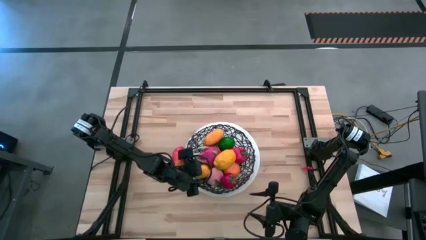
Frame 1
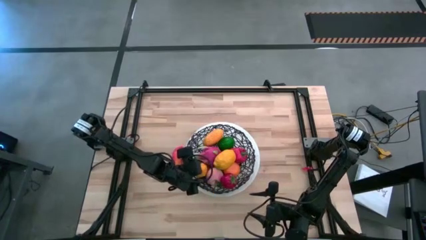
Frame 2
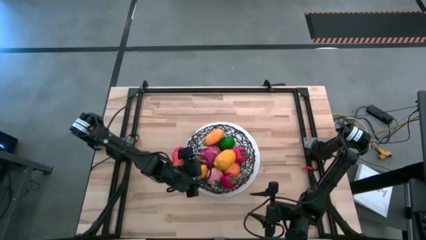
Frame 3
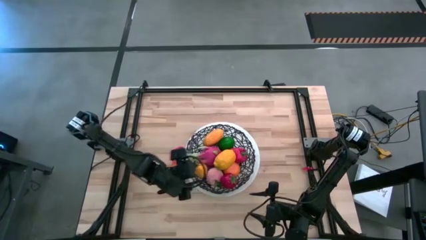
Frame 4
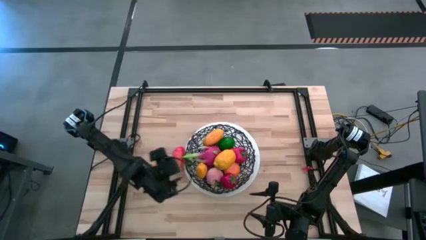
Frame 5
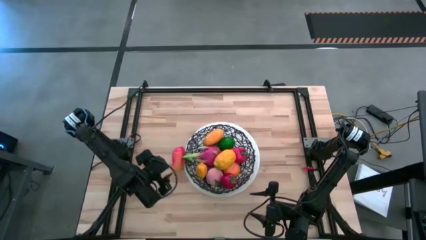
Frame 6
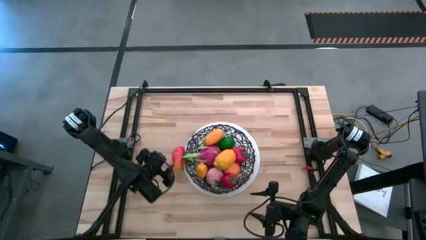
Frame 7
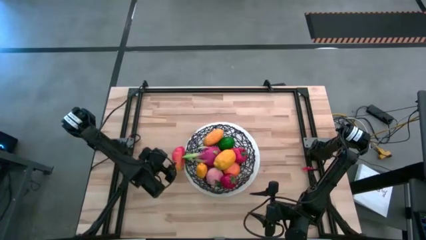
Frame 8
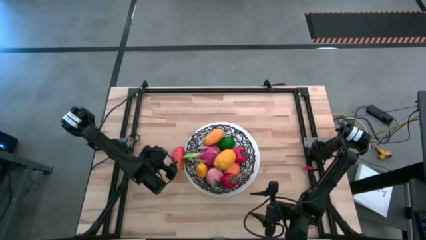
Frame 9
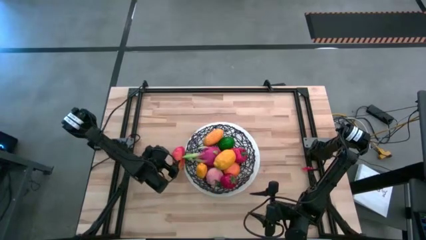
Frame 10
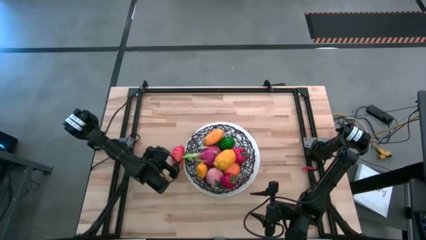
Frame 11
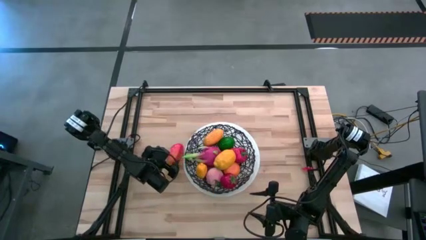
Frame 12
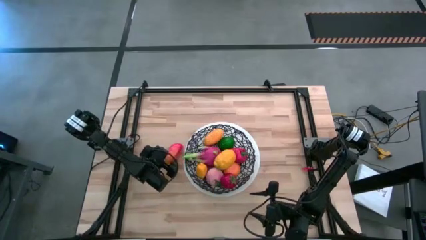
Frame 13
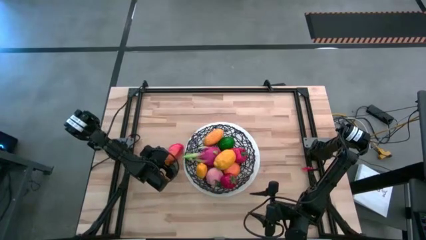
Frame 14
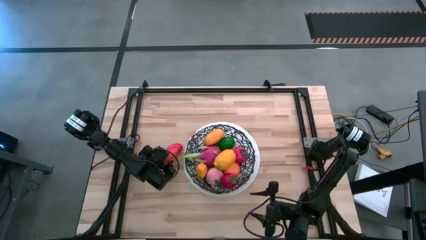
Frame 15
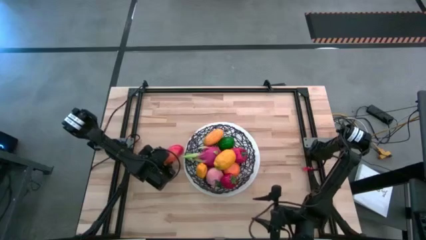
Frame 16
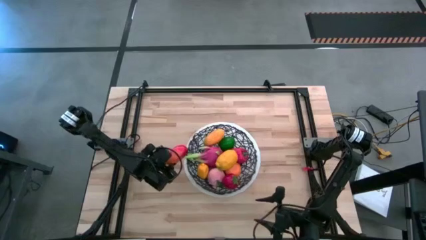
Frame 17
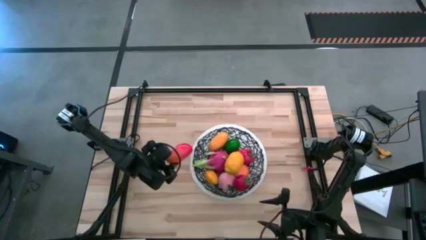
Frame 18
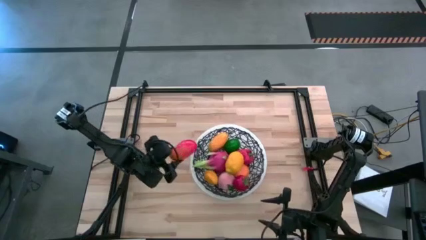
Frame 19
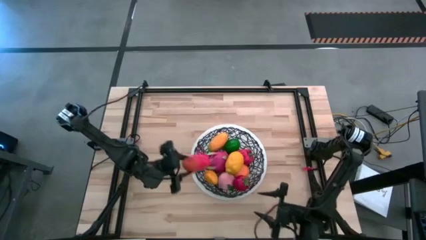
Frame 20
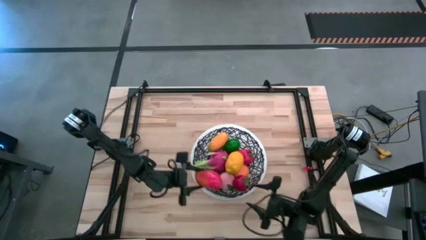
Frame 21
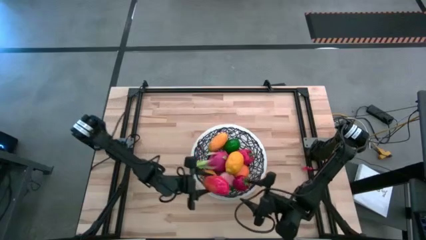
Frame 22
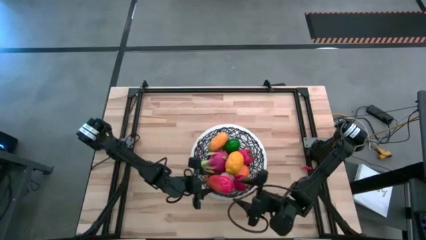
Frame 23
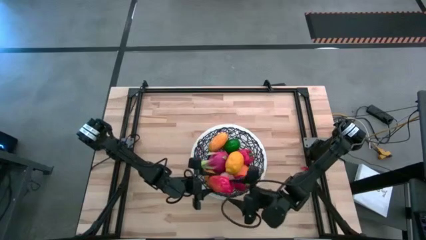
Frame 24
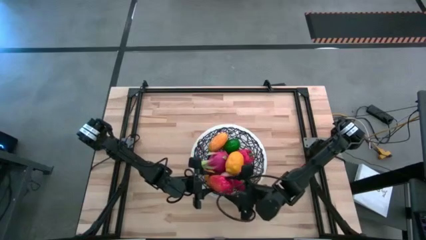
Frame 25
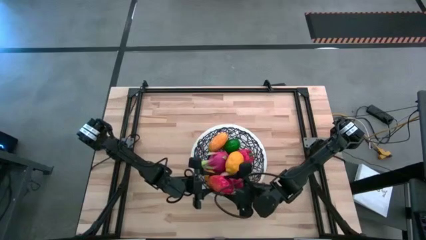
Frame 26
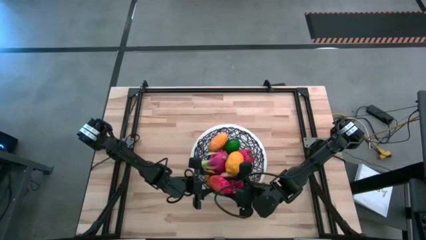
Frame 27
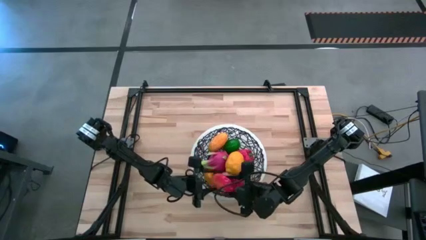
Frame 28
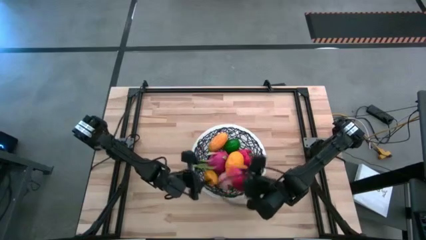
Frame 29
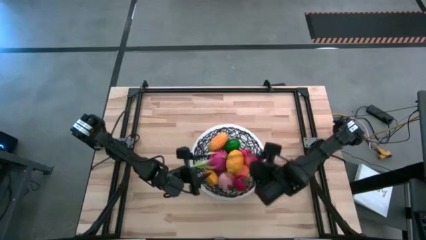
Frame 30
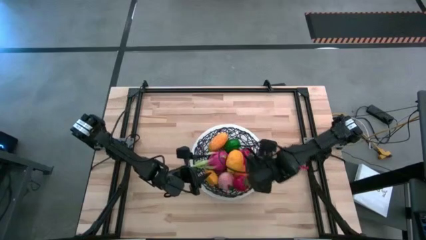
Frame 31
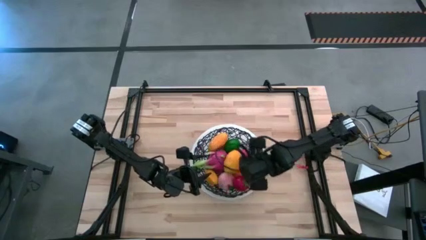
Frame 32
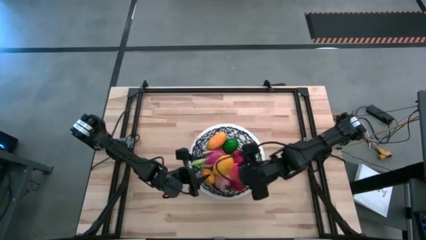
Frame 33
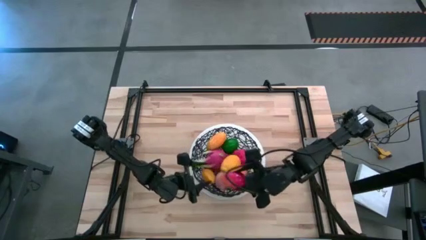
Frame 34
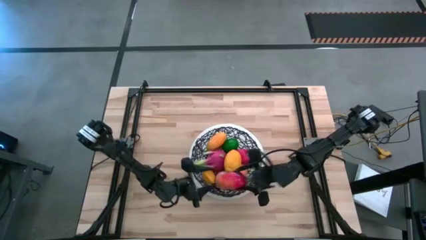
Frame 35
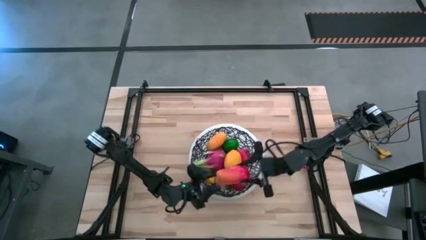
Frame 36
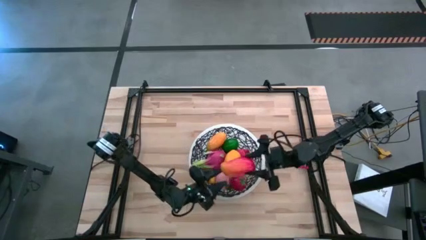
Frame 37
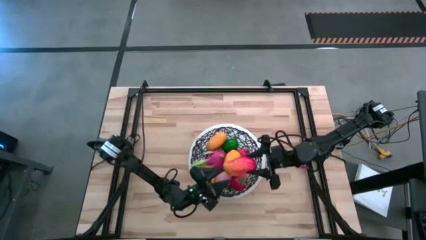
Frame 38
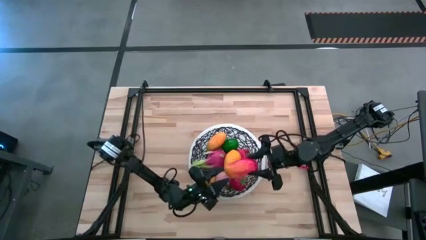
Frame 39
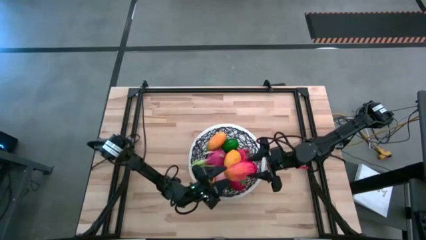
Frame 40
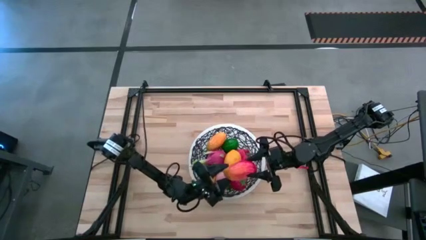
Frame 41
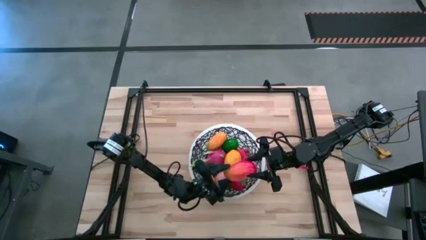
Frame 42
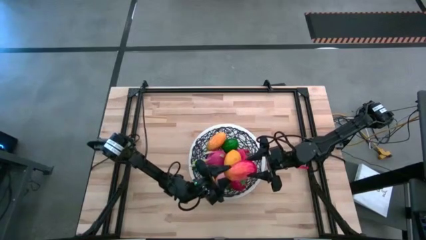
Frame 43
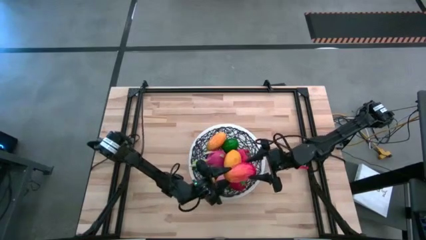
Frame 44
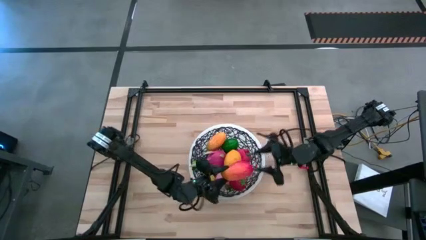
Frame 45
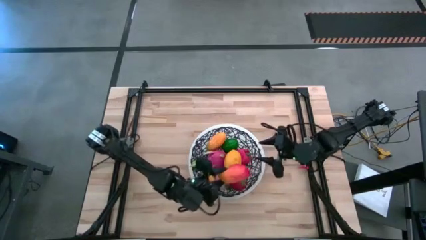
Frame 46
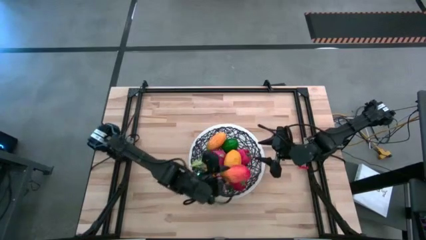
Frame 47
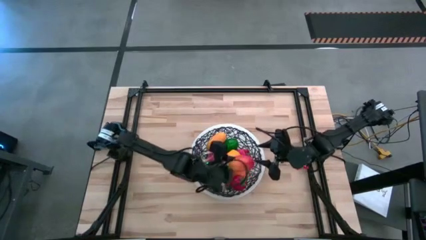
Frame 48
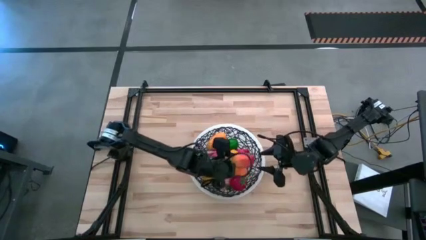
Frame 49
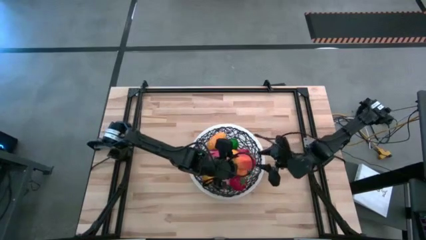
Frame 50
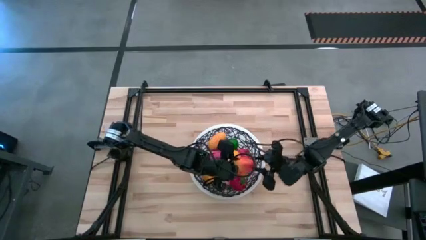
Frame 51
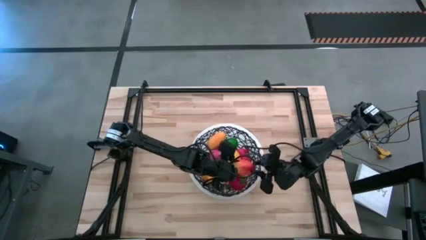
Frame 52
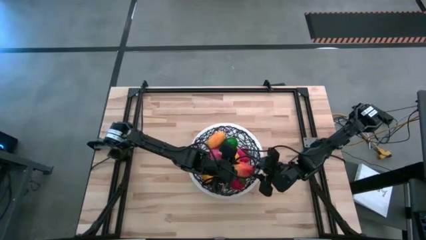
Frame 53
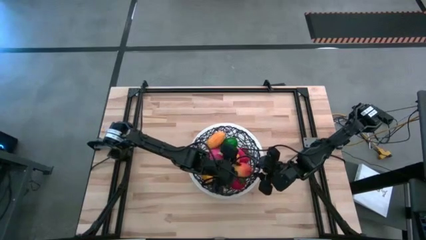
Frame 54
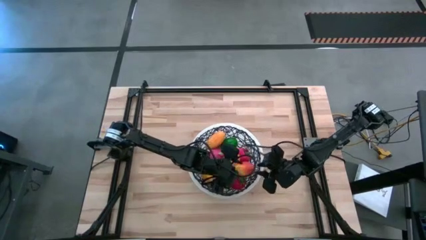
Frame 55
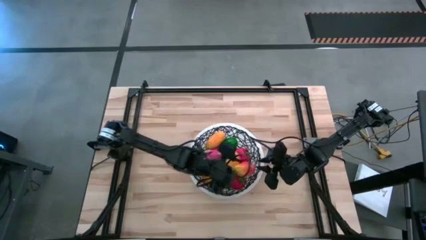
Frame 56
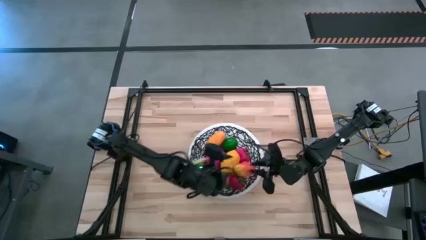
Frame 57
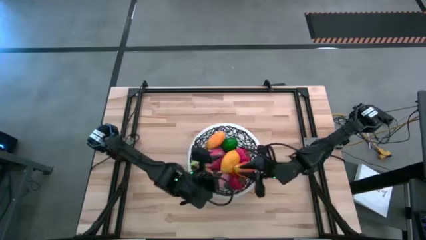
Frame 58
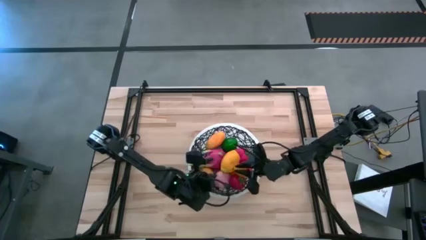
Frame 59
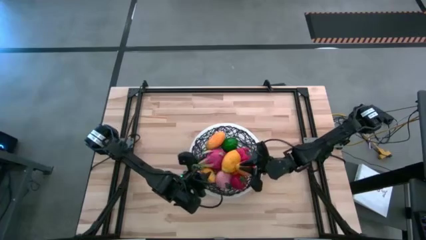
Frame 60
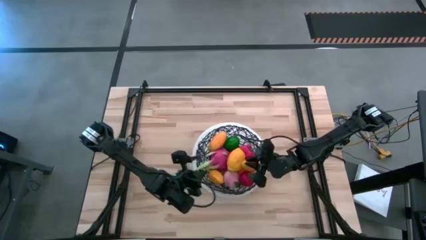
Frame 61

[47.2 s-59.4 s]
Task: Build produce basket
Put the red mango into the basket

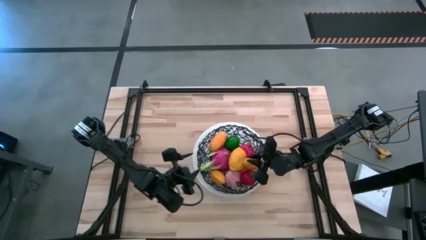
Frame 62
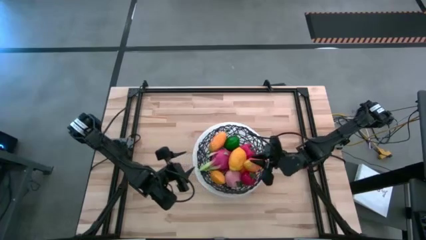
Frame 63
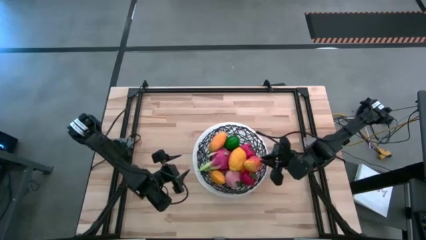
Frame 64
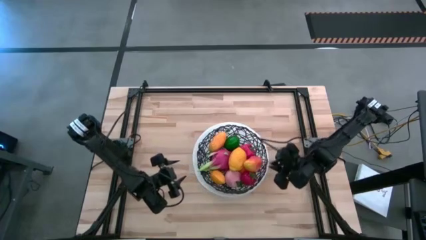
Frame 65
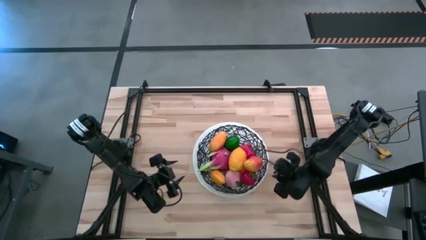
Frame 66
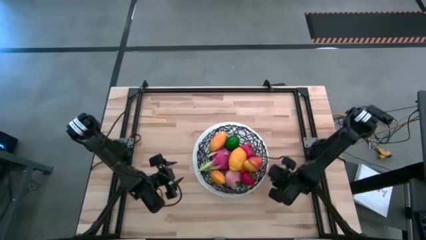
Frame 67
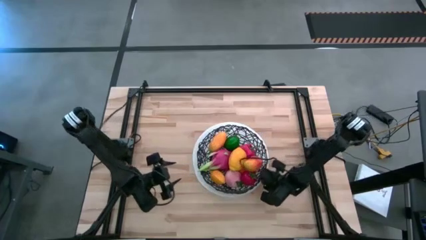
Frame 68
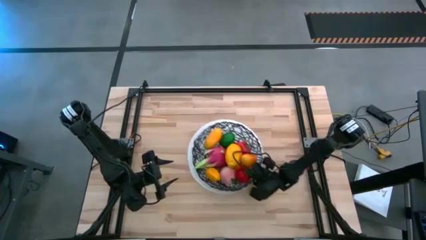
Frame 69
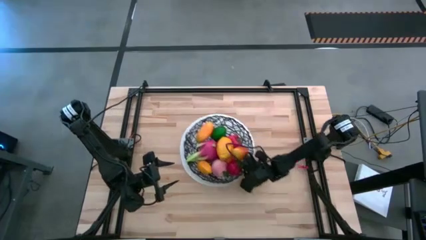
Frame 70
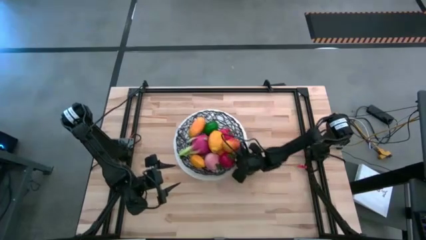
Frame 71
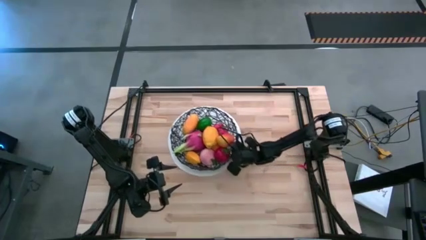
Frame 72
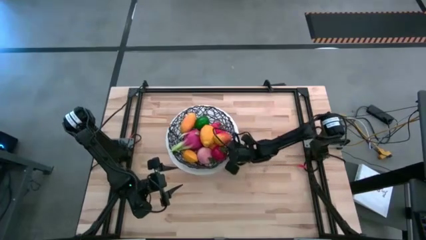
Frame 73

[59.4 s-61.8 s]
Move the basket to the top left corner of the table

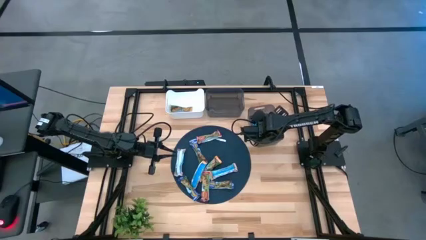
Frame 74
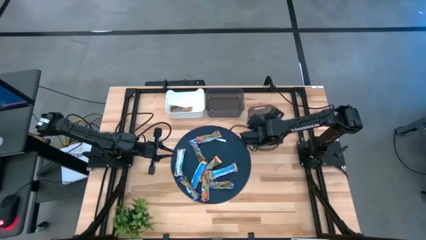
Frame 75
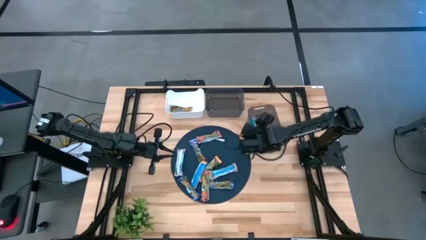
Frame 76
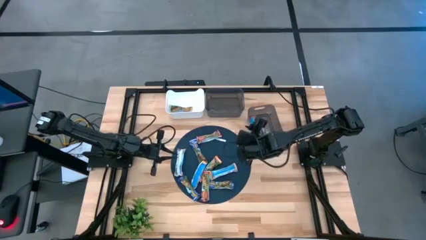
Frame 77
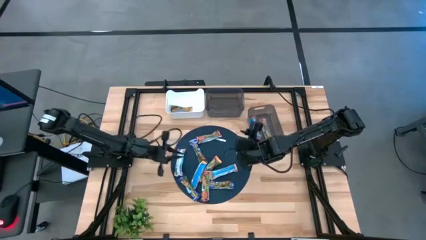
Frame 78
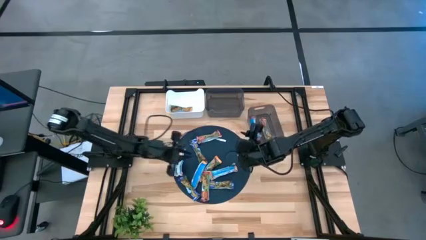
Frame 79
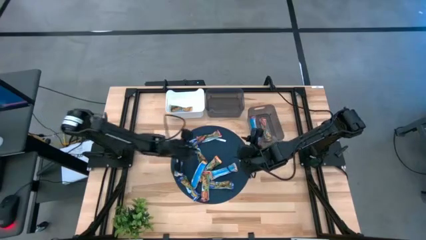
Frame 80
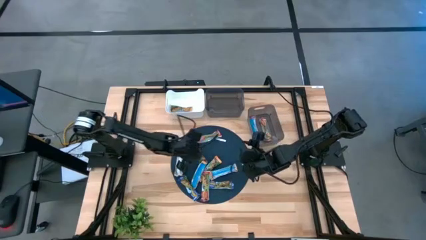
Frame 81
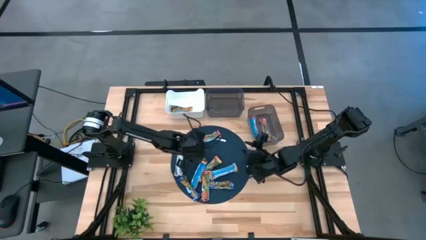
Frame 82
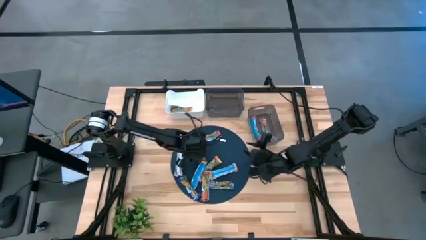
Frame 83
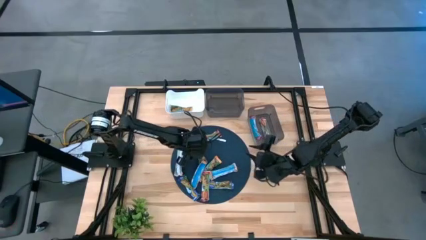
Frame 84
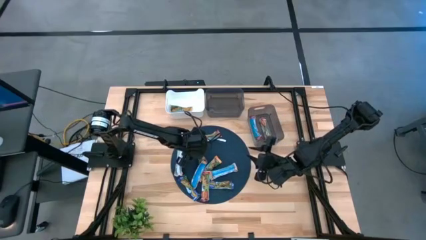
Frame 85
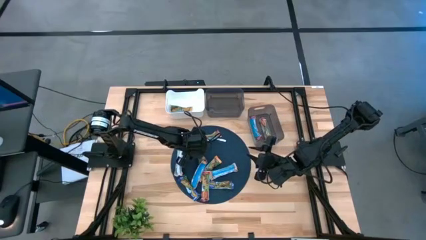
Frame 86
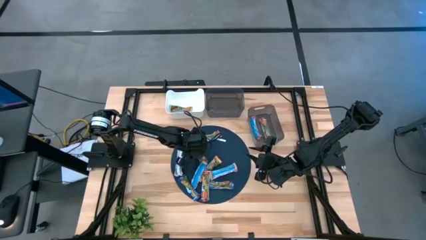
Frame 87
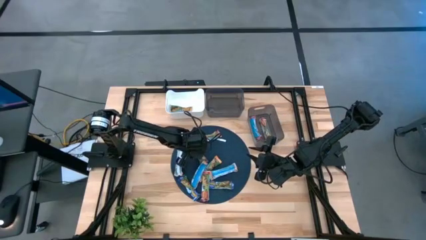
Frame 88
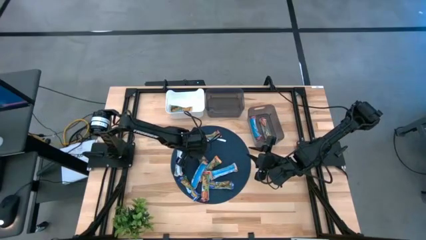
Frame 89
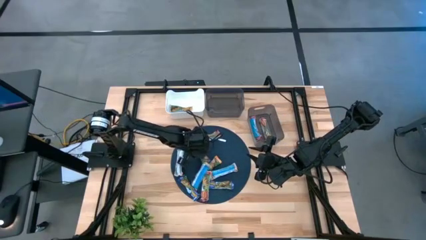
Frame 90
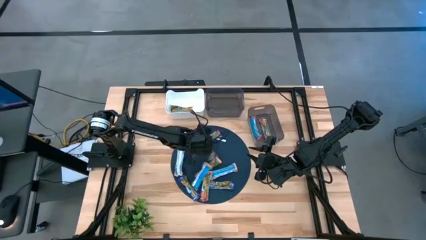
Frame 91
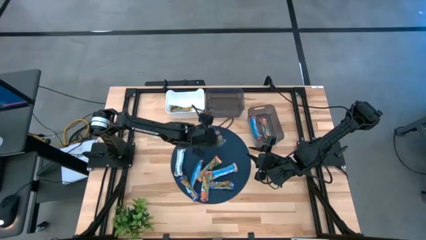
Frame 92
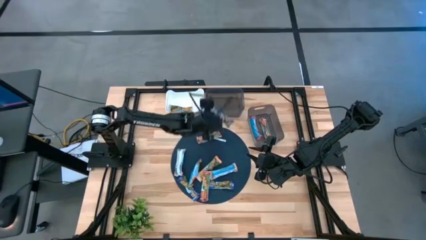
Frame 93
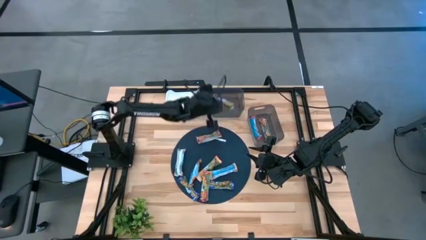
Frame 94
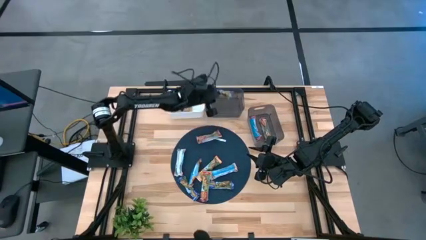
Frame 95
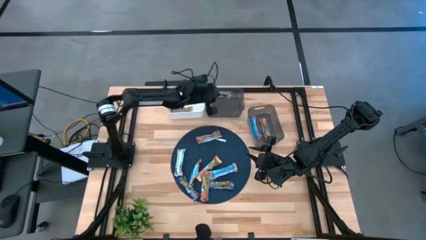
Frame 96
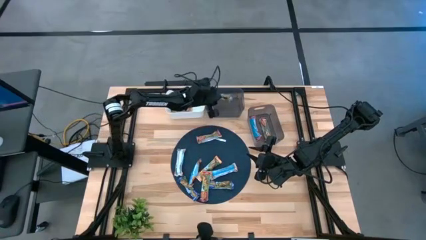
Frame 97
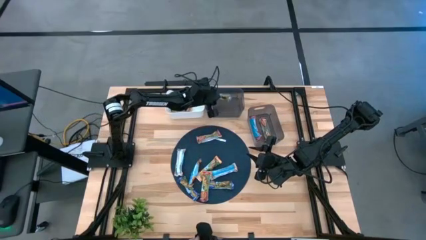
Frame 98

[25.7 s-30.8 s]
Task: Pick and place Granola Bars by type
Put the blue granola bar into the top black bin
